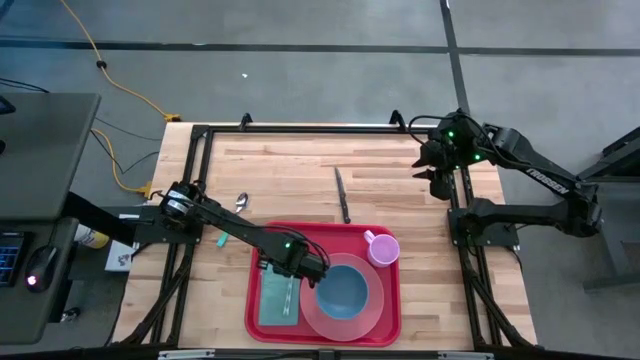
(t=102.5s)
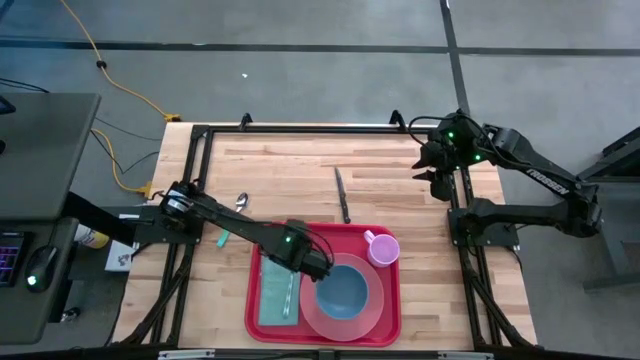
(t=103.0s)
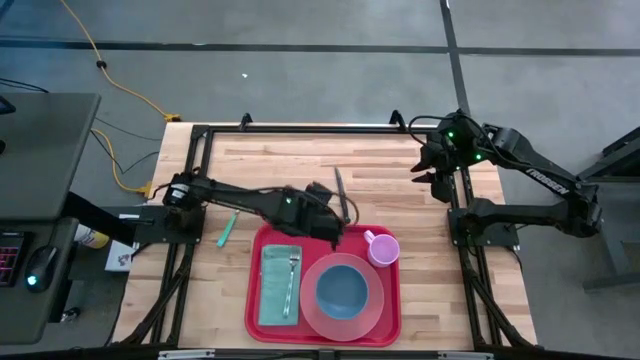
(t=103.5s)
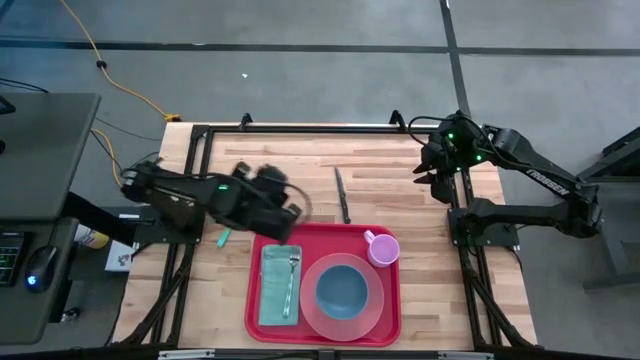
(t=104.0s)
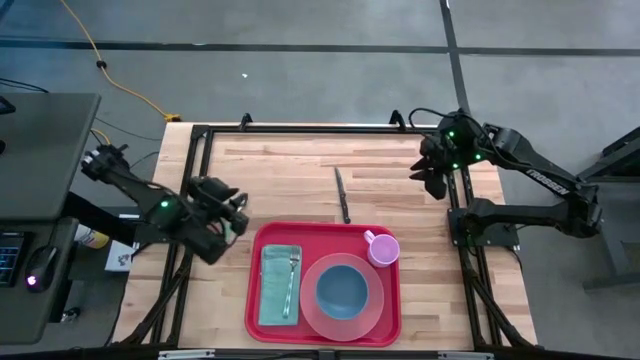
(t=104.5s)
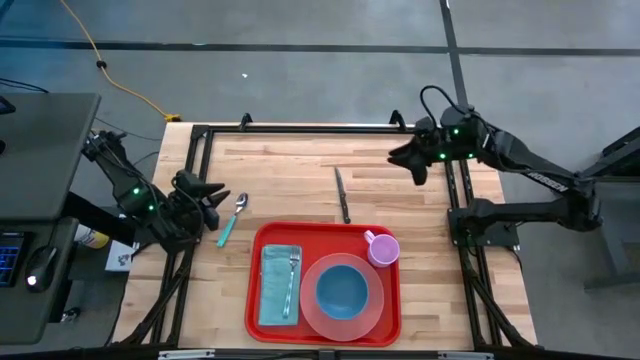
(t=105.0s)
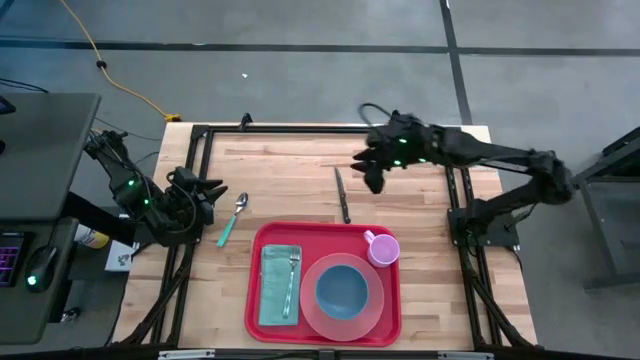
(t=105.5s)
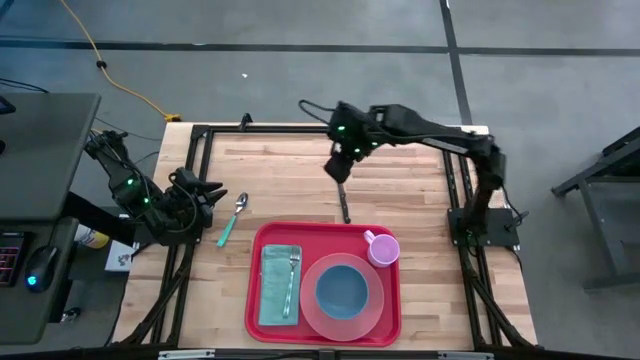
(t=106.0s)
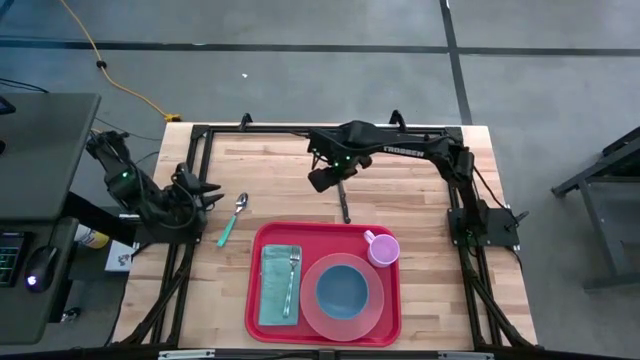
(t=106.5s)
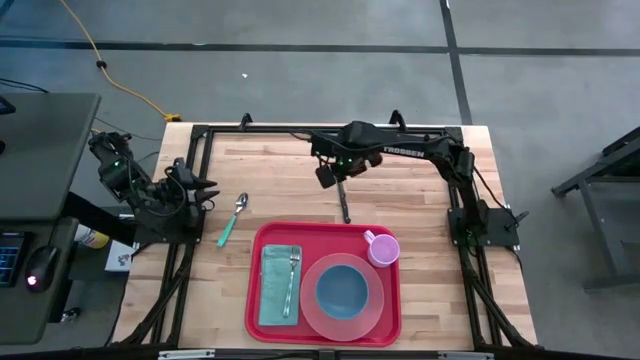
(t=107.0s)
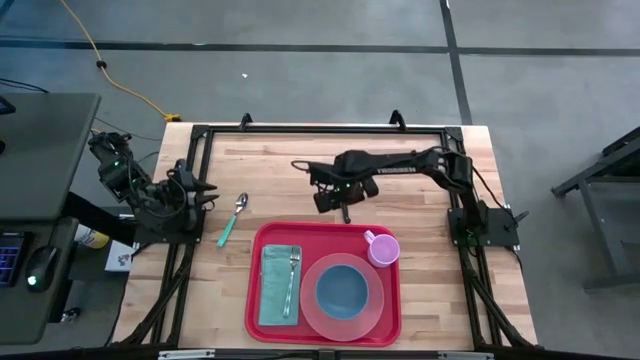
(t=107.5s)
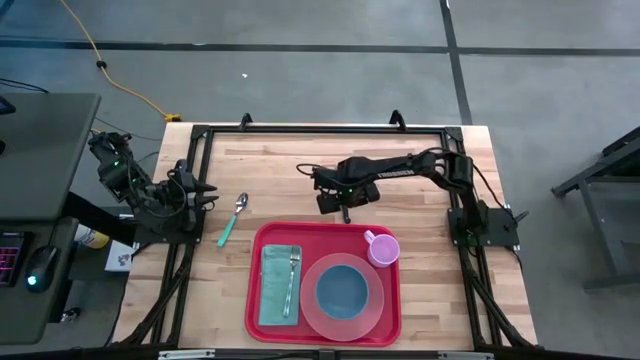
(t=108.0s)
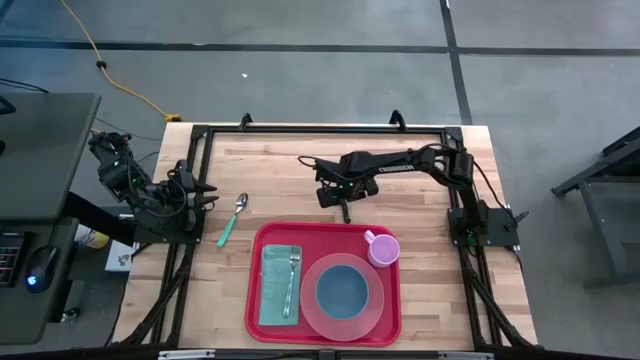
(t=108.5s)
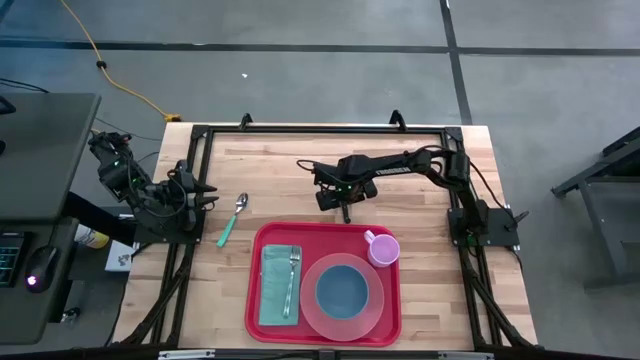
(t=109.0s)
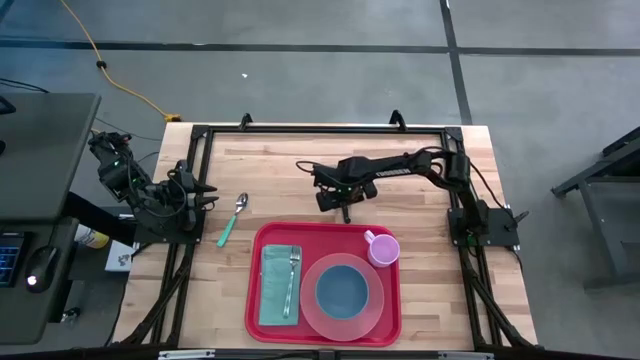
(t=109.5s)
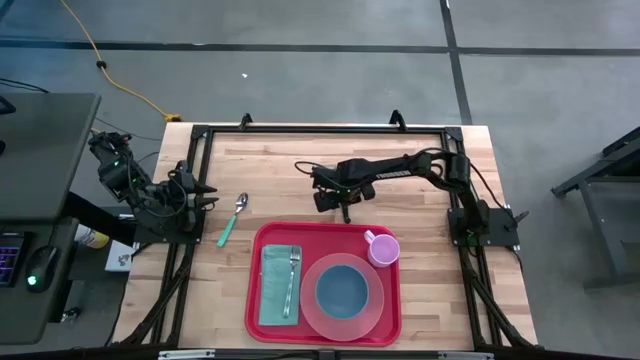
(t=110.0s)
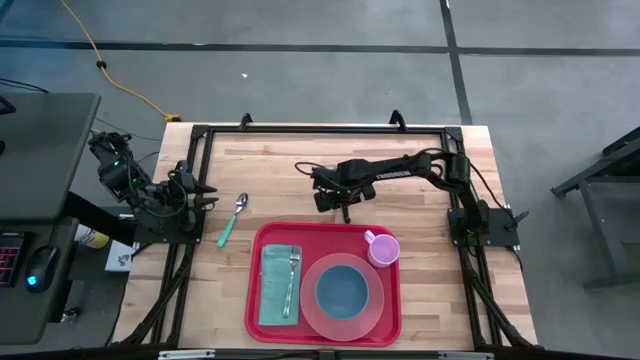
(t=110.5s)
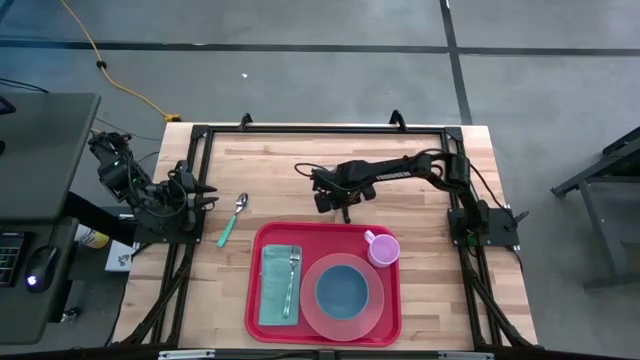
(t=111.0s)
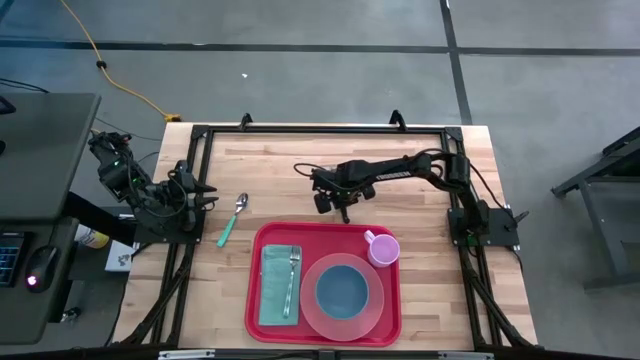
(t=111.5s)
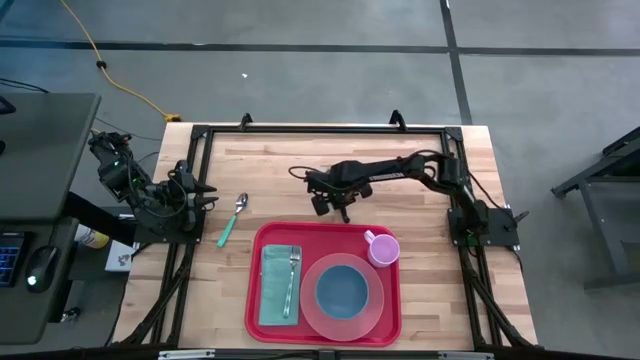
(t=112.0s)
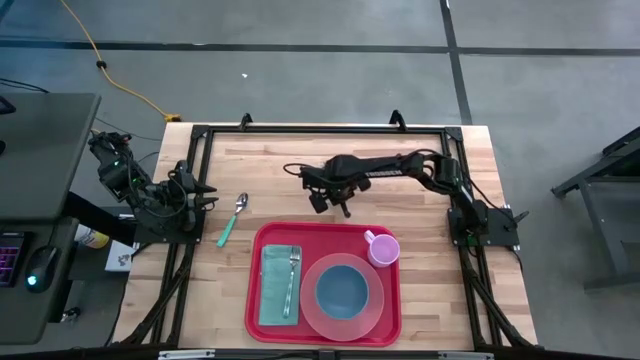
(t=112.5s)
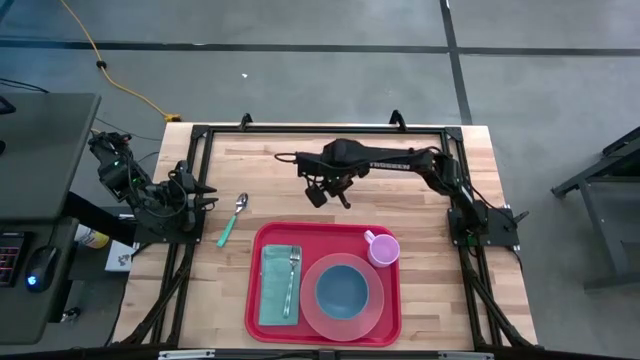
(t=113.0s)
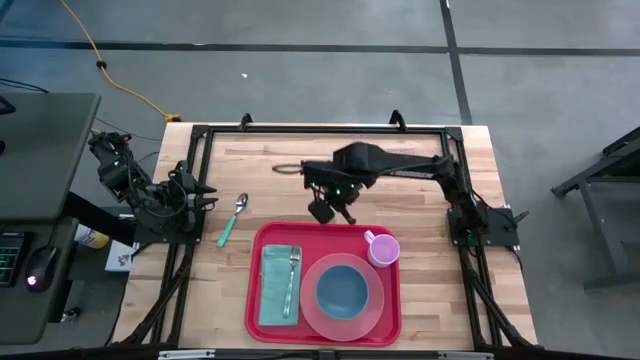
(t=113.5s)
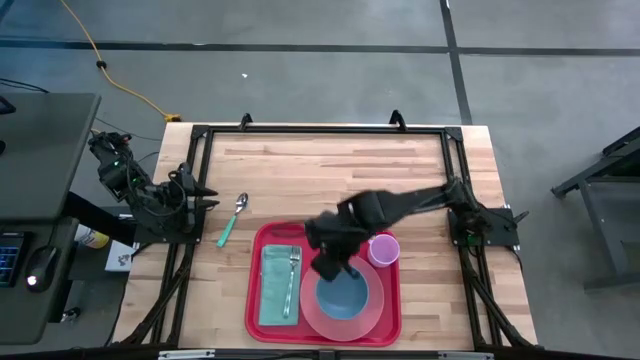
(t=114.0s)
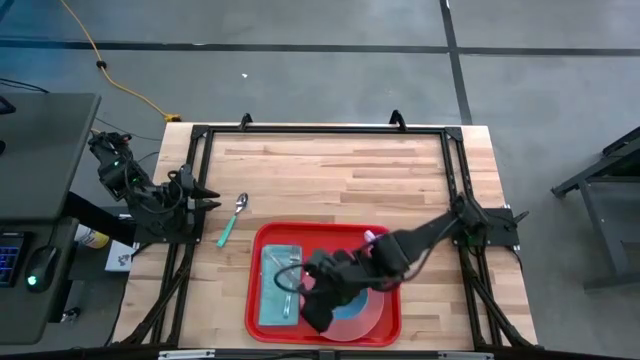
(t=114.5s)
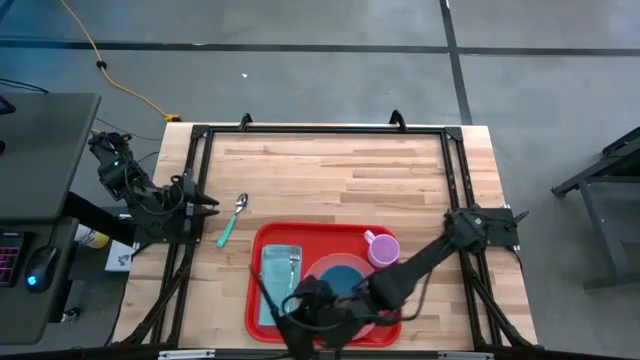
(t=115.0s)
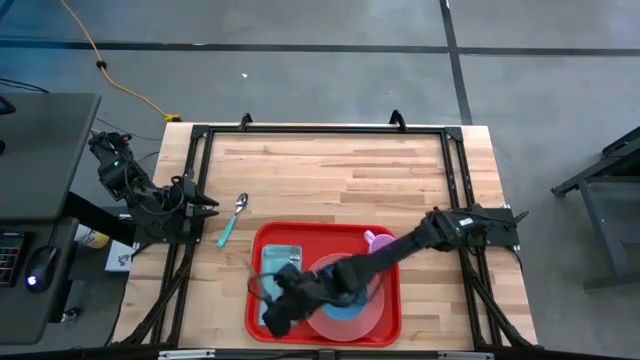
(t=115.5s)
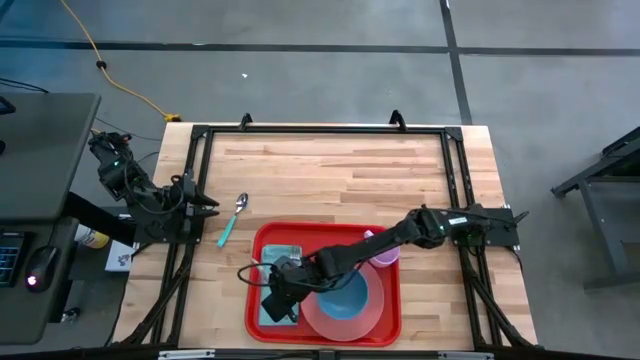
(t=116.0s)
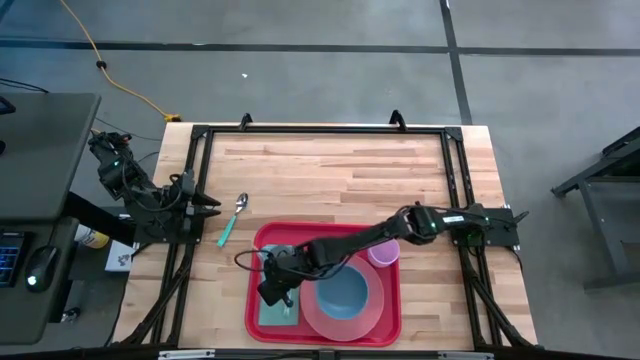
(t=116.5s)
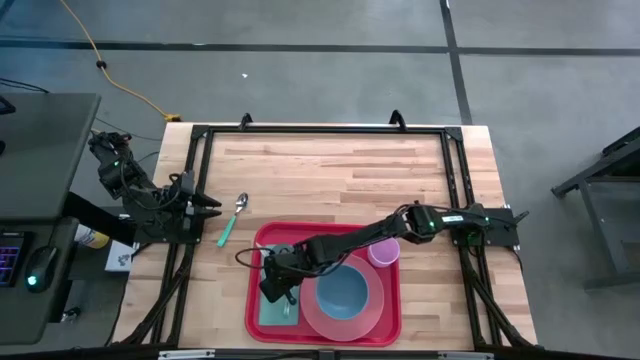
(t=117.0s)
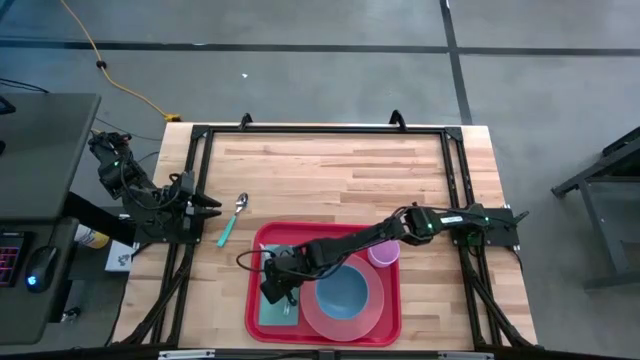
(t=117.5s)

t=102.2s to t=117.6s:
Task: Set up tray
Put the black knife on the blue napkin to the left of the blue patterned fork

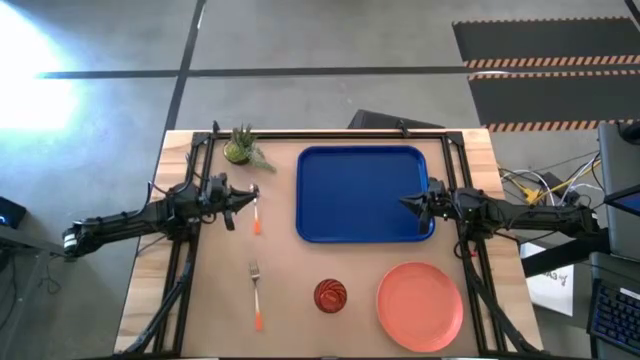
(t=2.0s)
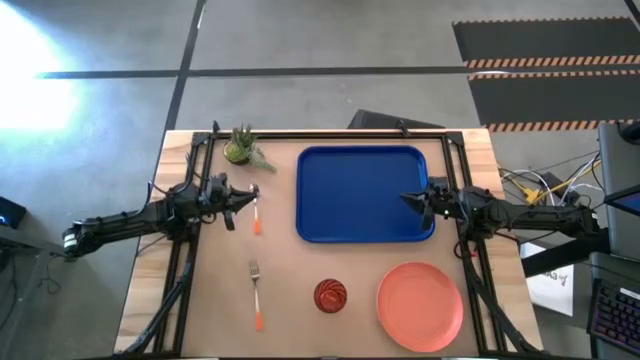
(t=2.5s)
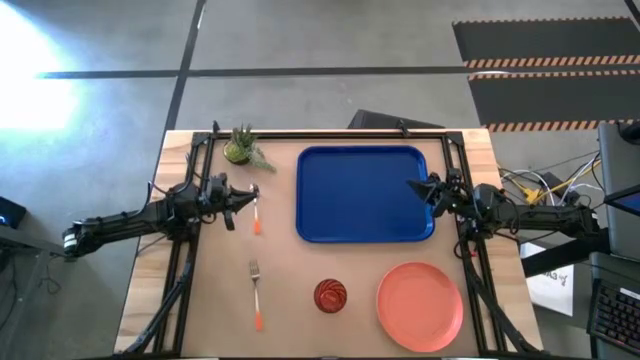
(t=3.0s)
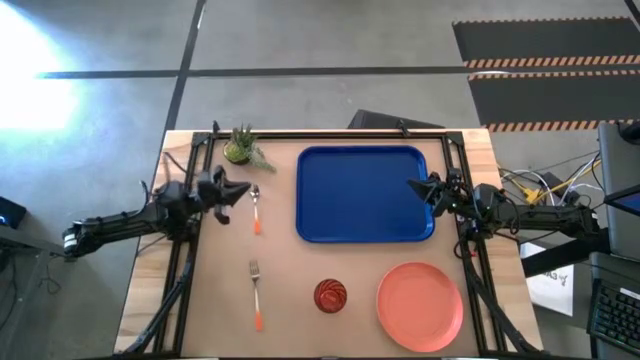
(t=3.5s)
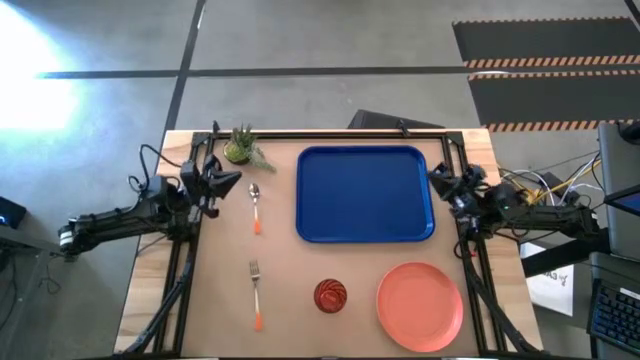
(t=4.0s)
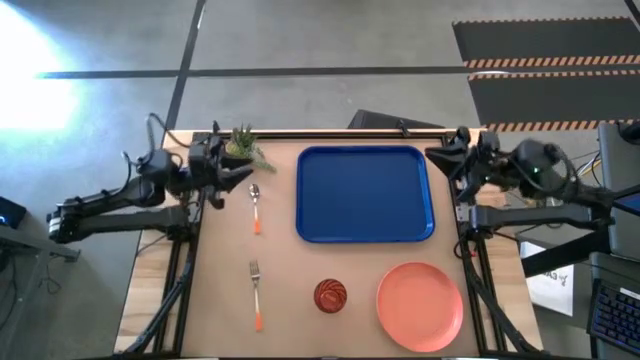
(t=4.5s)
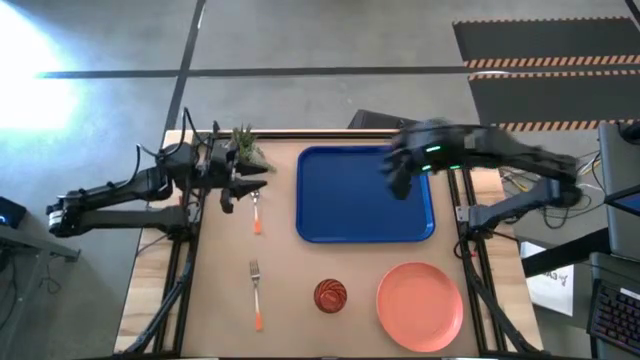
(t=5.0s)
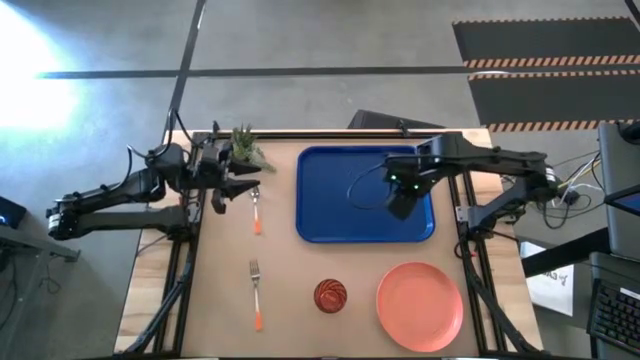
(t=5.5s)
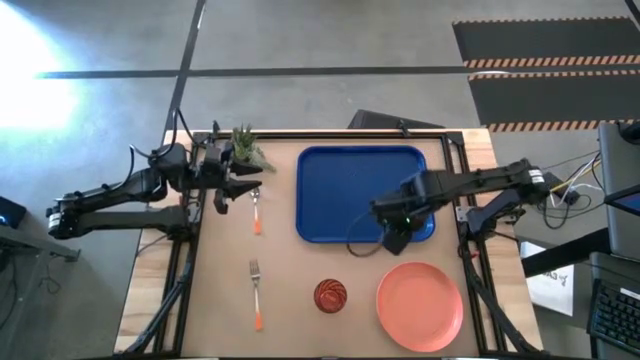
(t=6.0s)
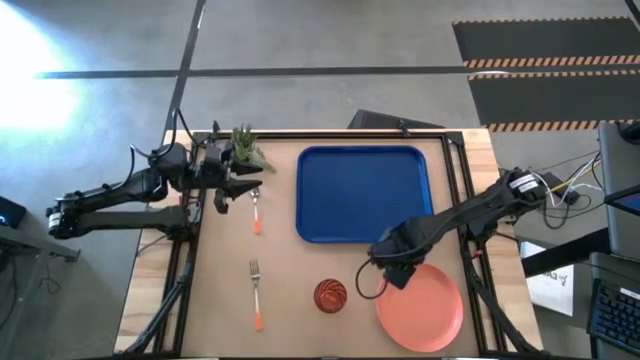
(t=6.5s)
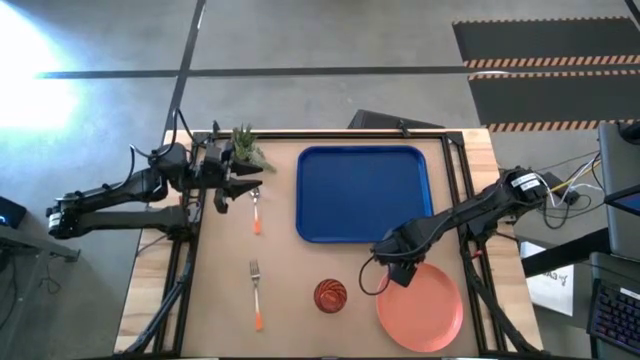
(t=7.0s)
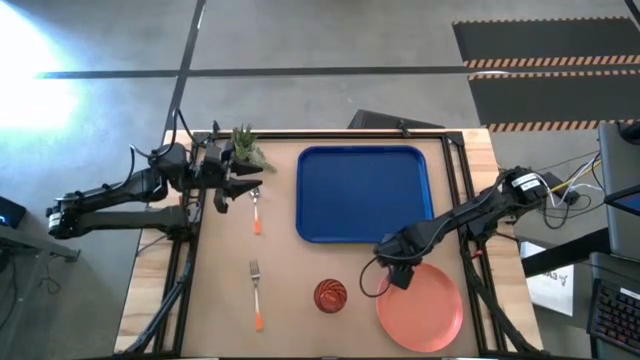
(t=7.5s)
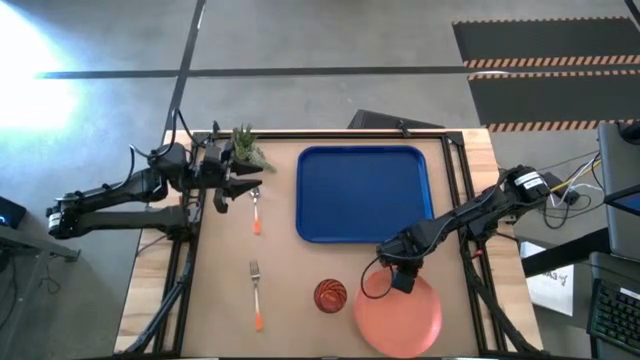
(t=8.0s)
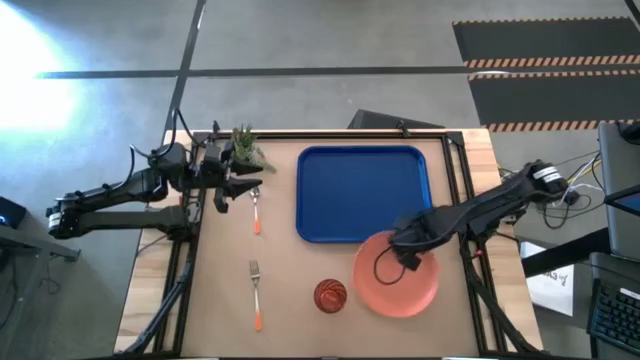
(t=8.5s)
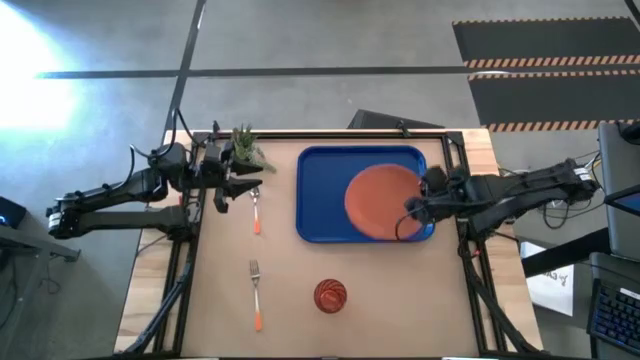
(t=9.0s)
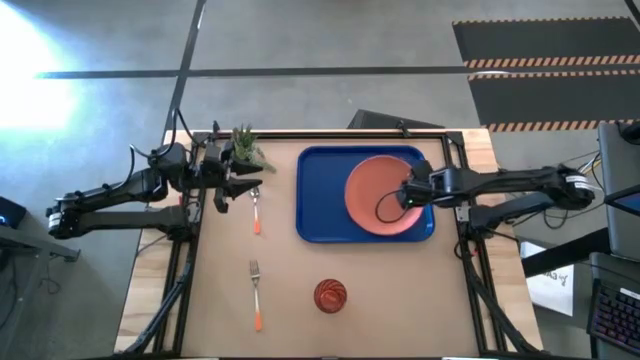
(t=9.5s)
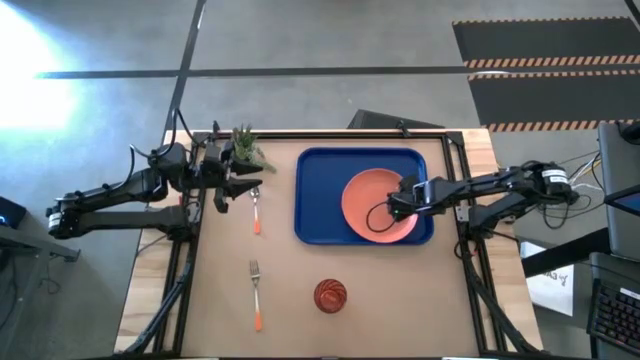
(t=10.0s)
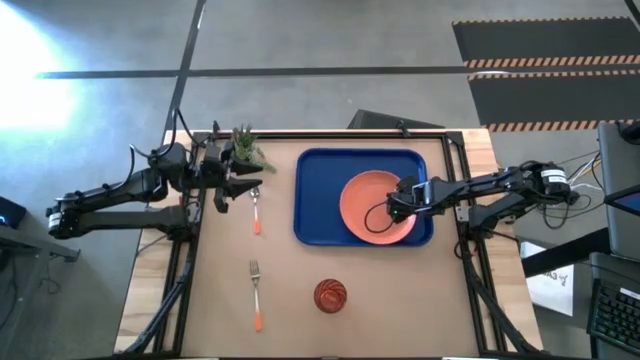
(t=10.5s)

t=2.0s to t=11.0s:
Task: Pick and place plate/cup/fork/spoon on tray
Put the orange plate on the bottom right of the blue serving tray
